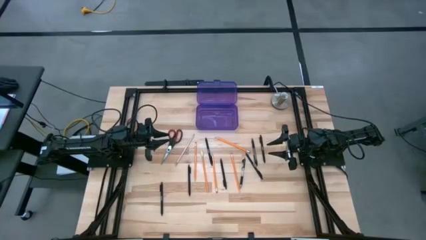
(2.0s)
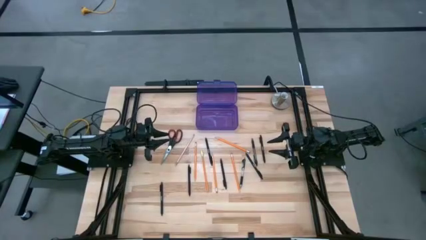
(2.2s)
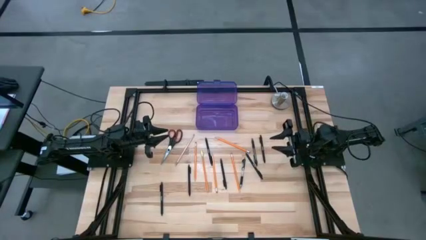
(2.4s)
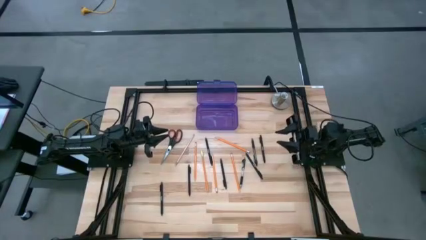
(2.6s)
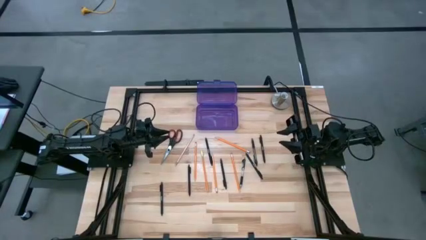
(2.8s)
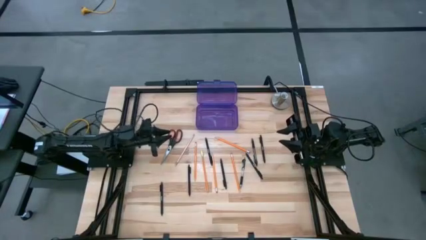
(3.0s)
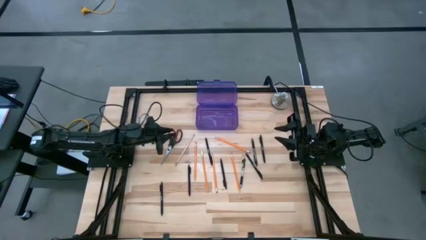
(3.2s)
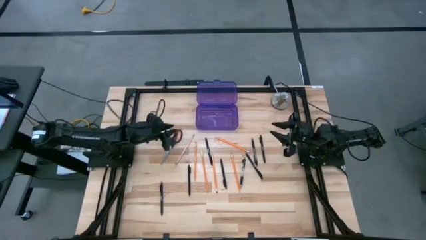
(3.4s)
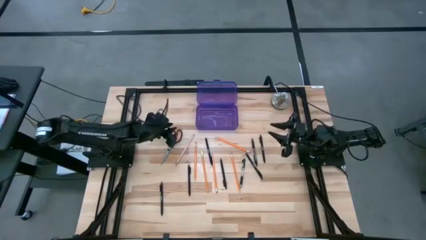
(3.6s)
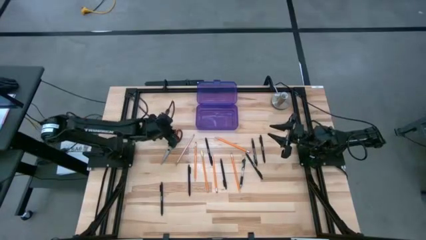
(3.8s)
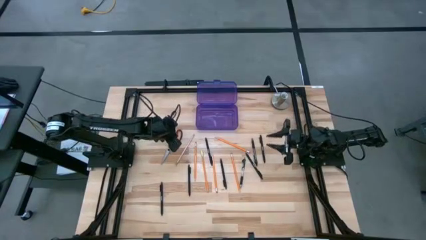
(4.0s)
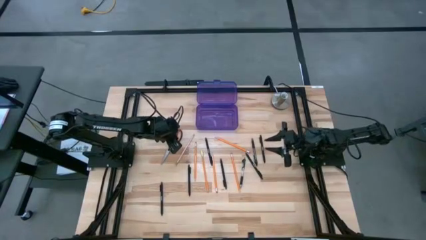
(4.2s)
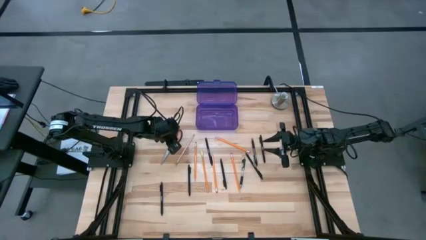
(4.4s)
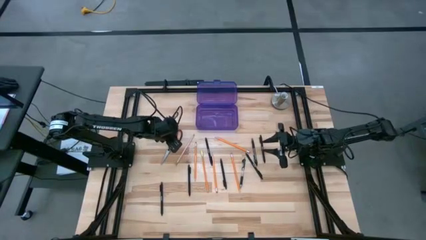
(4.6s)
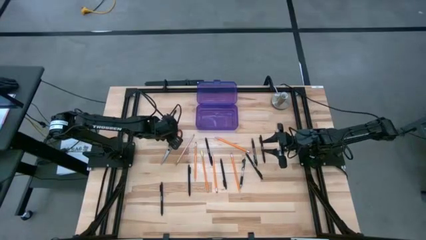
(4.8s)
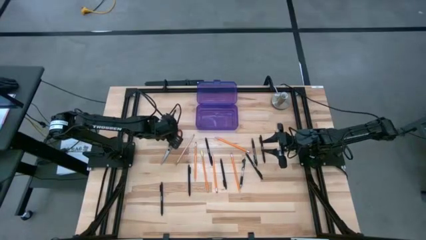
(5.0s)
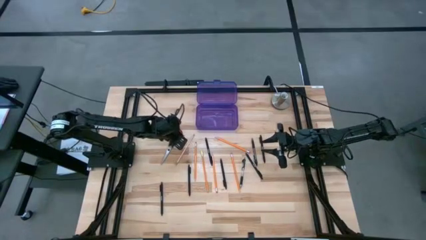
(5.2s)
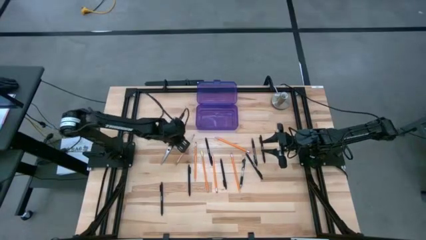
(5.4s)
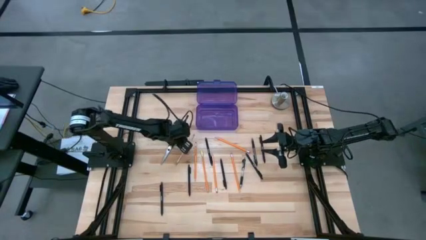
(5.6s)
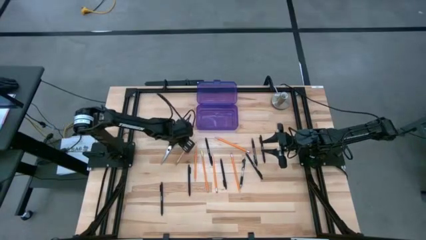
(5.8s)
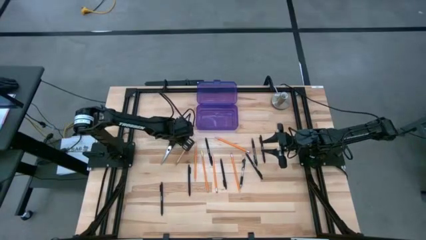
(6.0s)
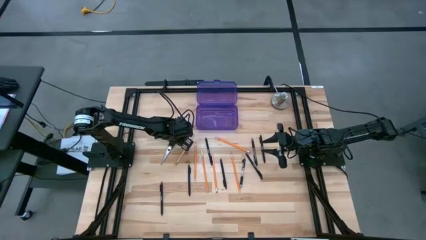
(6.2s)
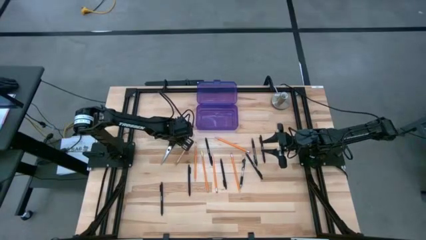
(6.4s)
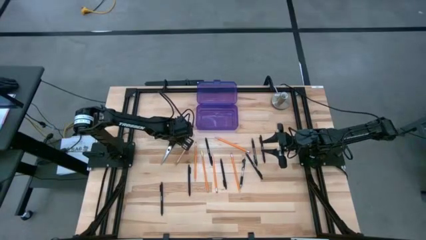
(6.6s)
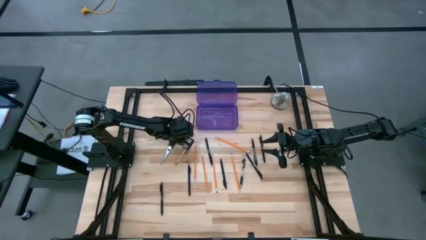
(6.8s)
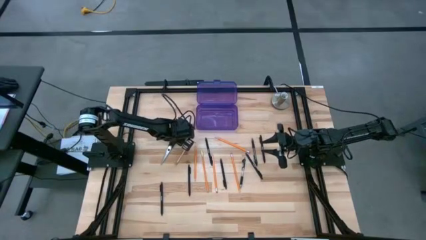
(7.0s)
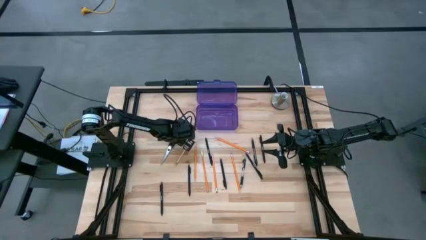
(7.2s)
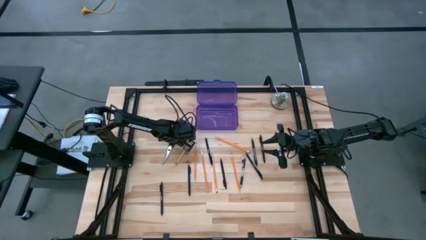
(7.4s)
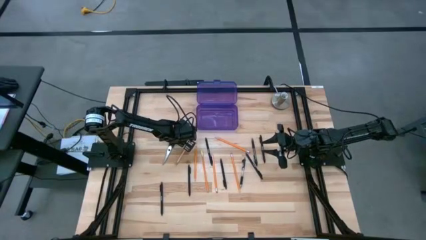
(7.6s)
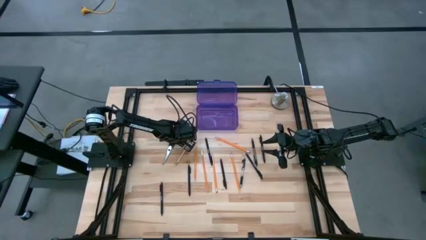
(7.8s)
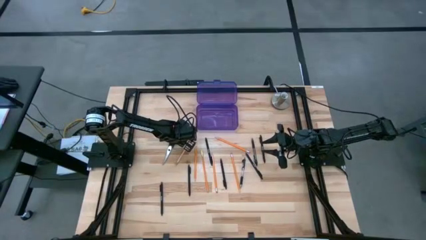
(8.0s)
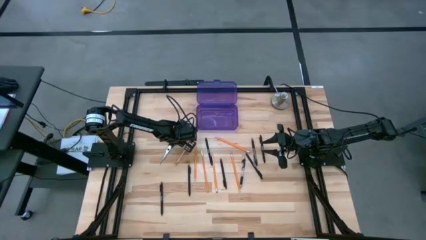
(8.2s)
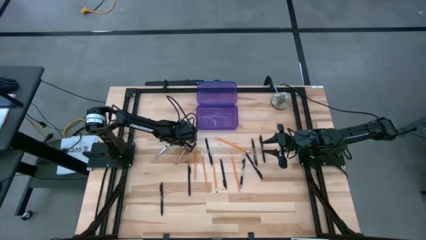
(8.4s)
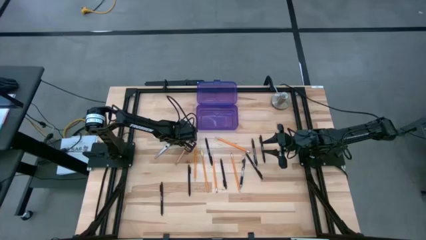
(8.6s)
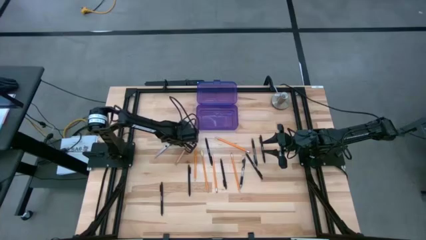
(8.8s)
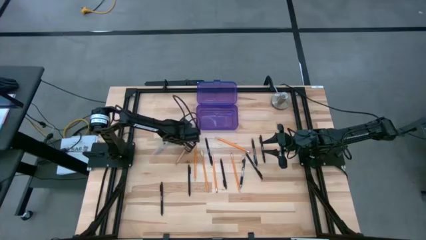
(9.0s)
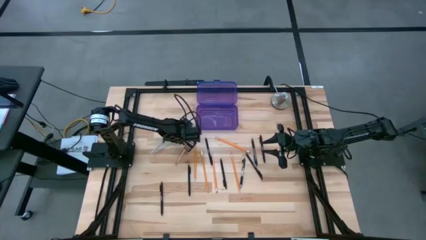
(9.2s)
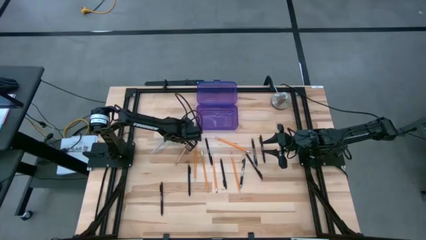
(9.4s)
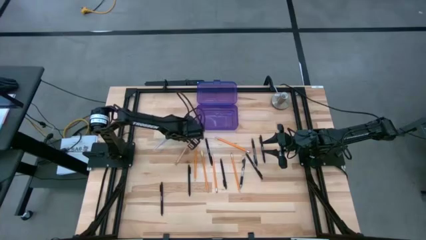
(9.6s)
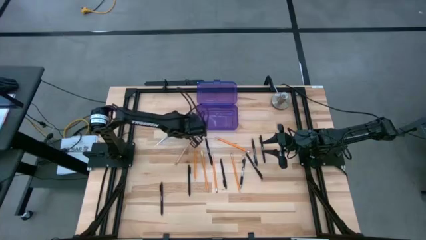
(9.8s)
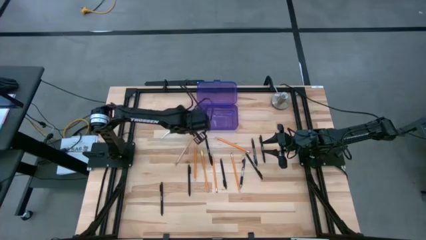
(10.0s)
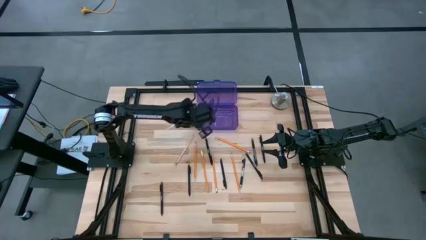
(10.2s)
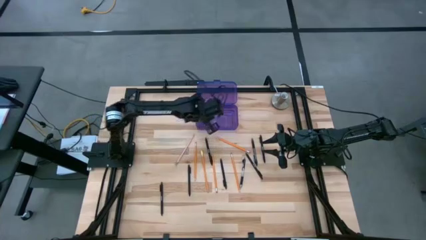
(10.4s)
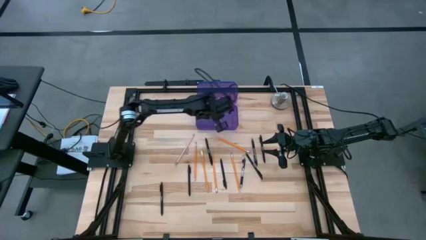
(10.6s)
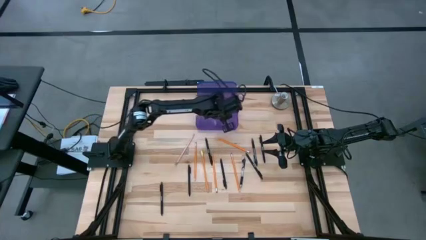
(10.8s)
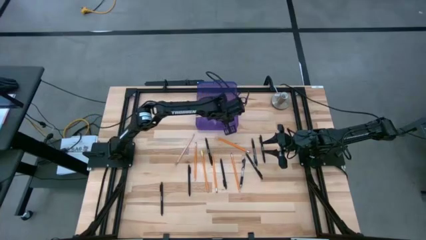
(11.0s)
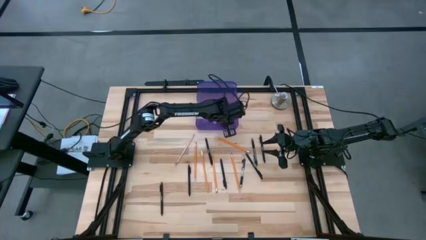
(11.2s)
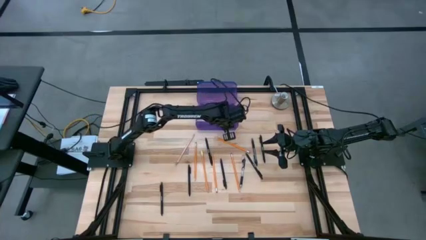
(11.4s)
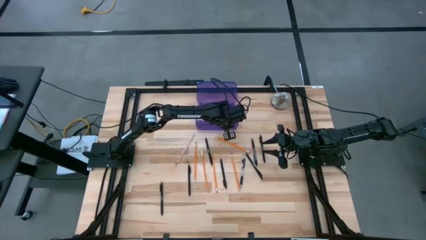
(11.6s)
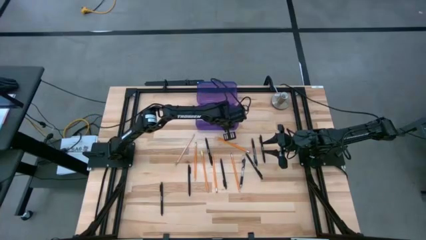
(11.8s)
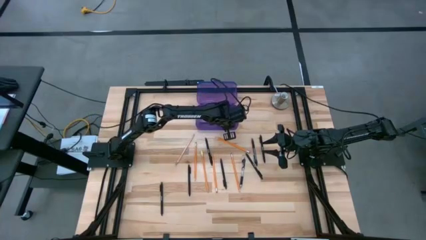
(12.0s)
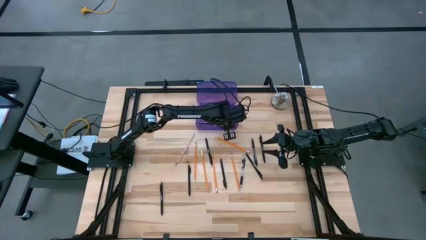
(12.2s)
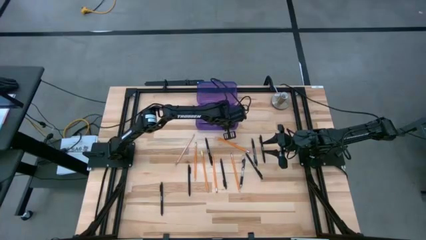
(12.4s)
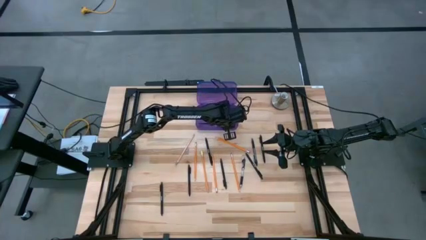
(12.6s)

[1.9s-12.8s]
Task: Pick & place school supplies into a supply box
Put the black scissors into the violet supply box

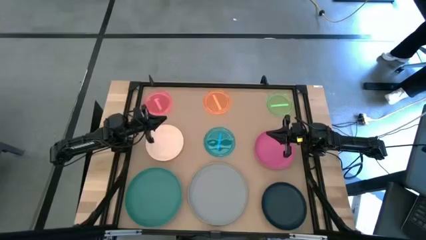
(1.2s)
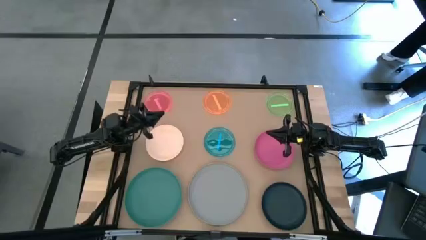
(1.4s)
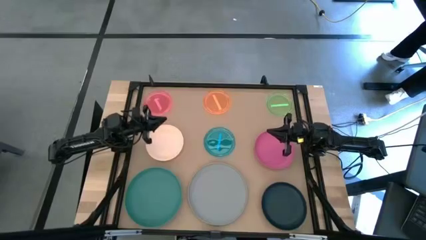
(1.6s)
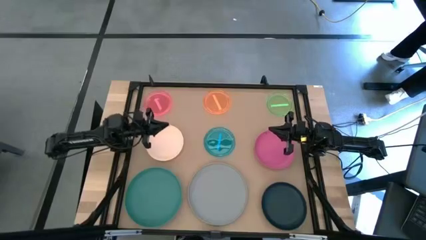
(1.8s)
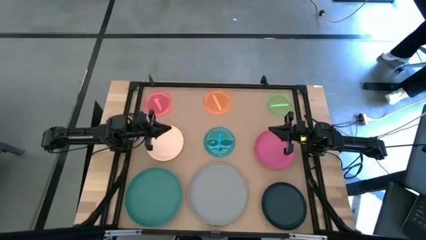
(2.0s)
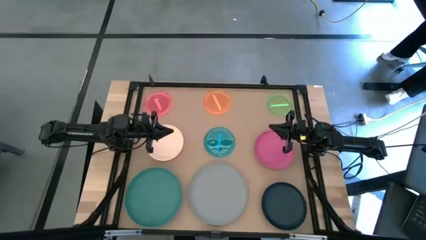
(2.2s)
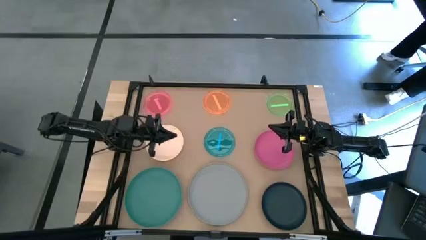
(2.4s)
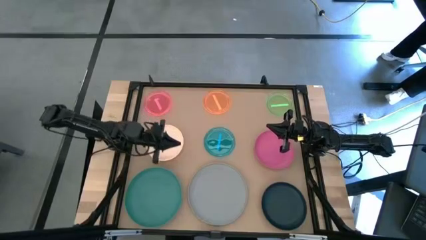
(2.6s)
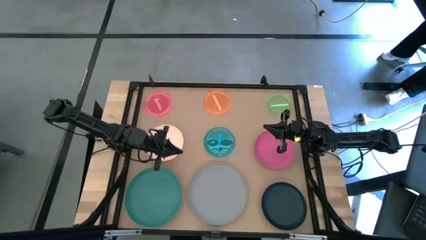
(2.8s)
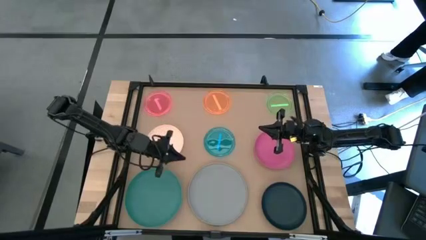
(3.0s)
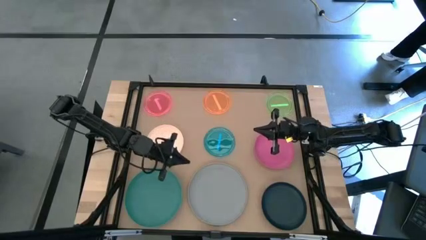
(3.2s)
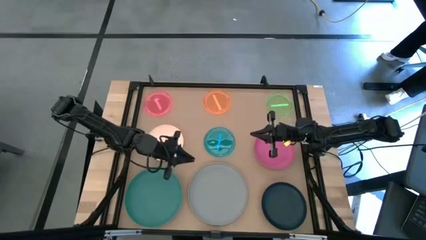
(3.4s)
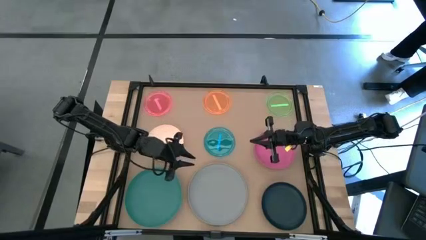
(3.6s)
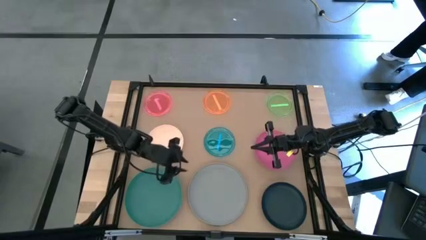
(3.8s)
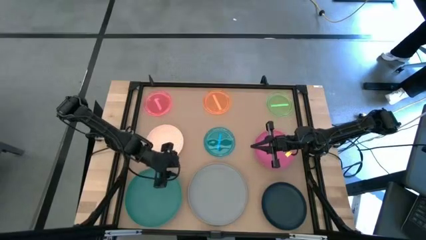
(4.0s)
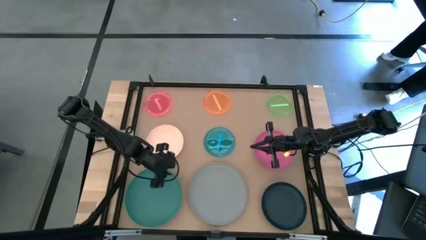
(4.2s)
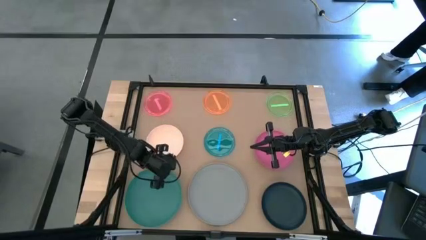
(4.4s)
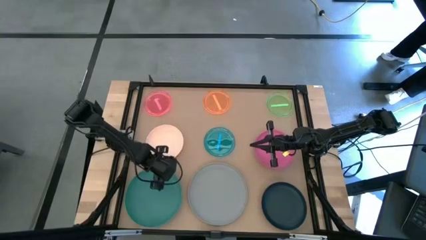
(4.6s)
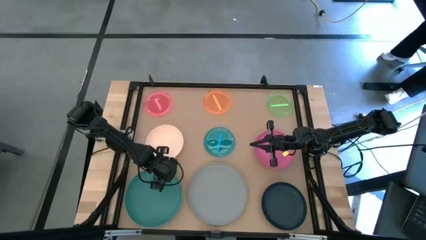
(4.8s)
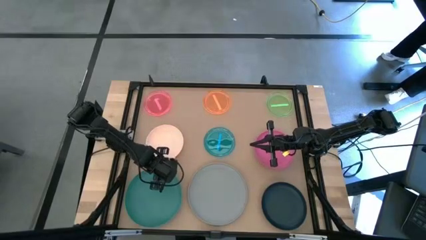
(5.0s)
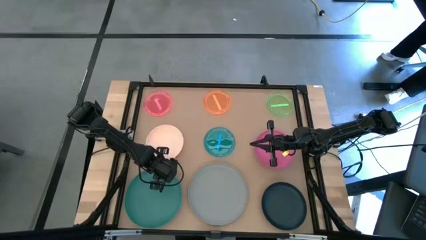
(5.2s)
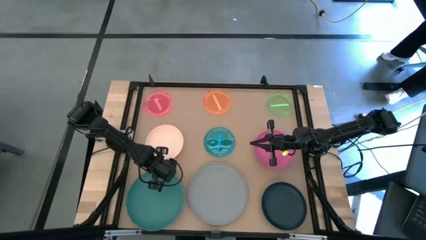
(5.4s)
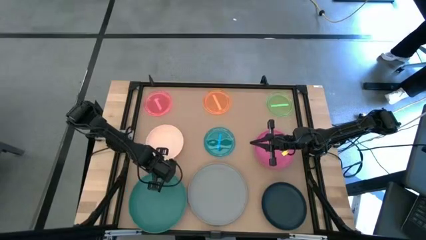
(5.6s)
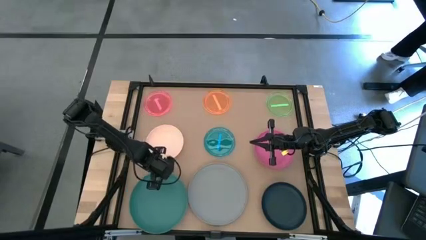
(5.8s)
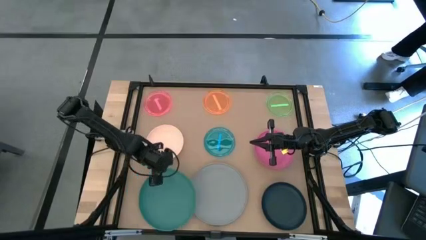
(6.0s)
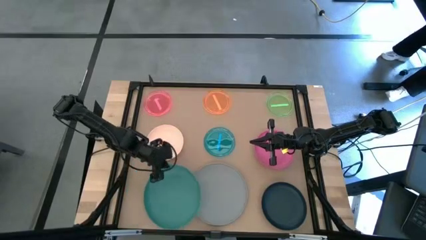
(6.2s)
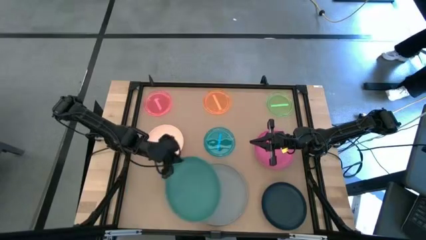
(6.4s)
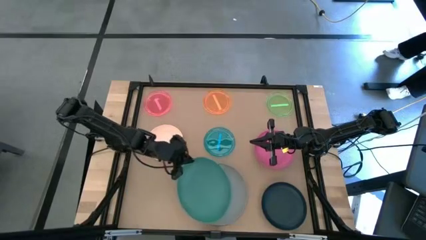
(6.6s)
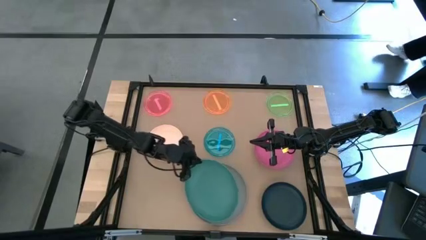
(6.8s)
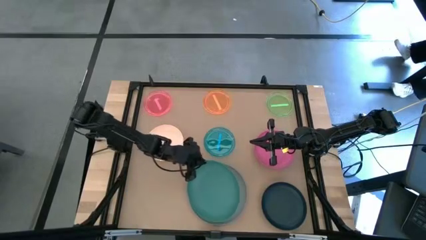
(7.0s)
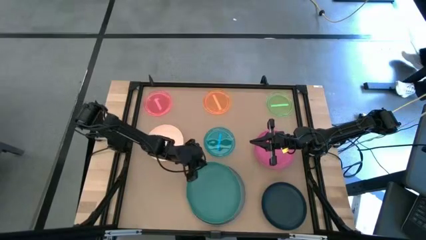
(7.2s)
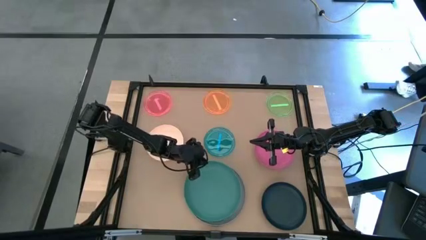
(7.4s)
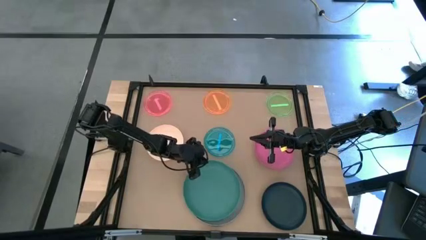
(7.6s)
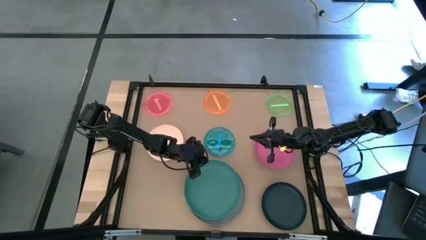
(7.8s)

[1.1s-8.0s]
Task: Stack plastic plates
Stack the green plate on top of the gray plate
